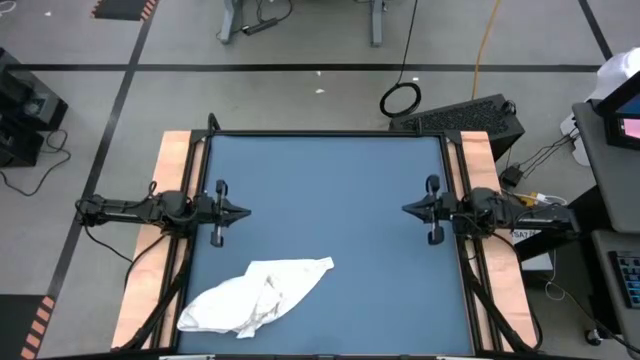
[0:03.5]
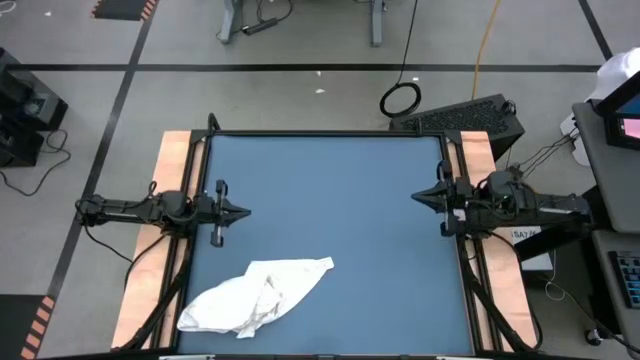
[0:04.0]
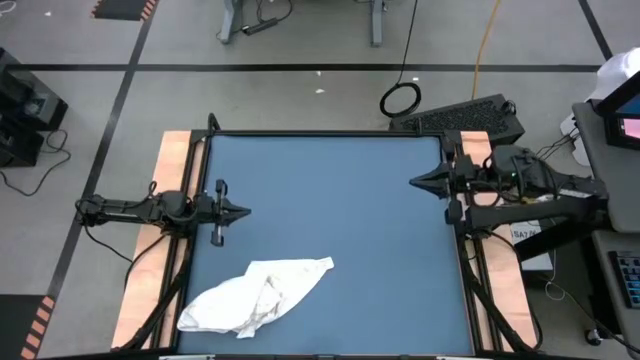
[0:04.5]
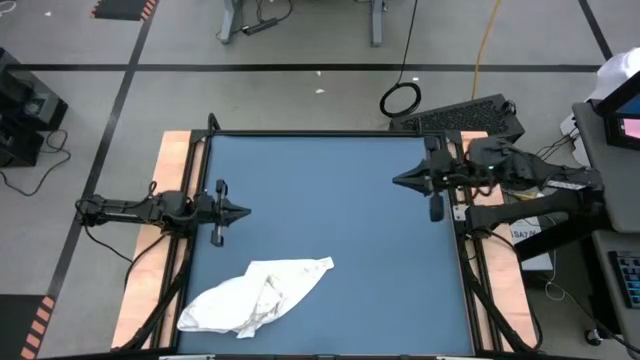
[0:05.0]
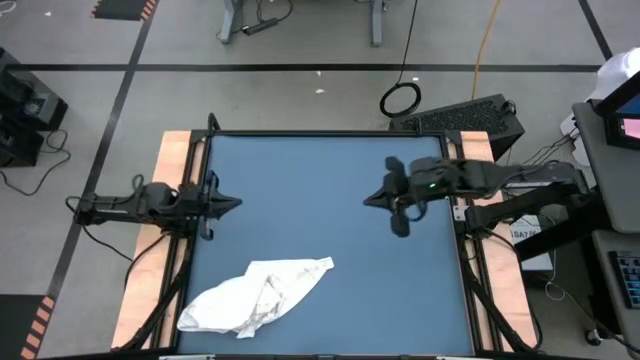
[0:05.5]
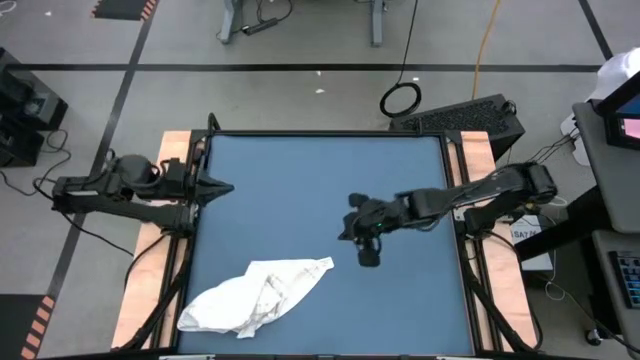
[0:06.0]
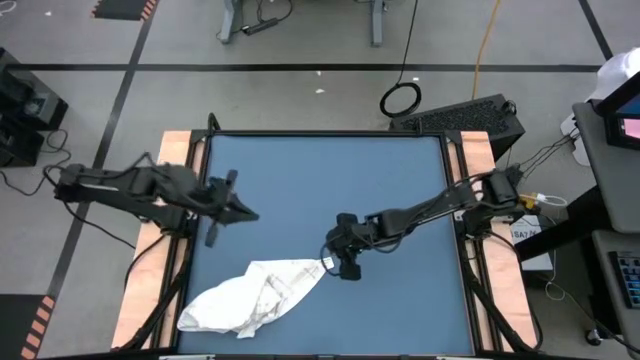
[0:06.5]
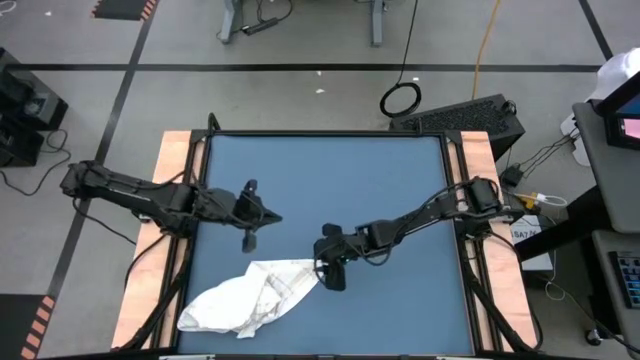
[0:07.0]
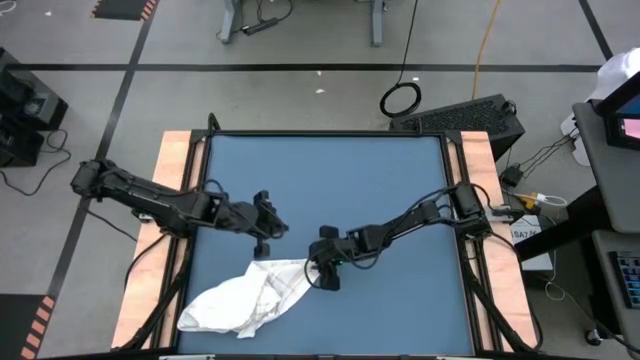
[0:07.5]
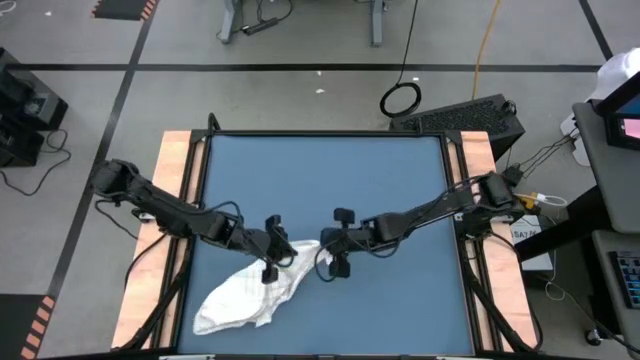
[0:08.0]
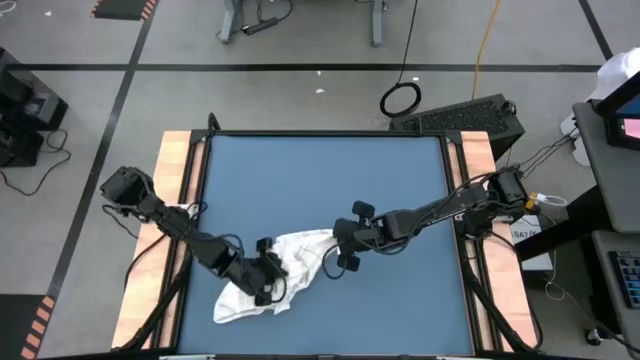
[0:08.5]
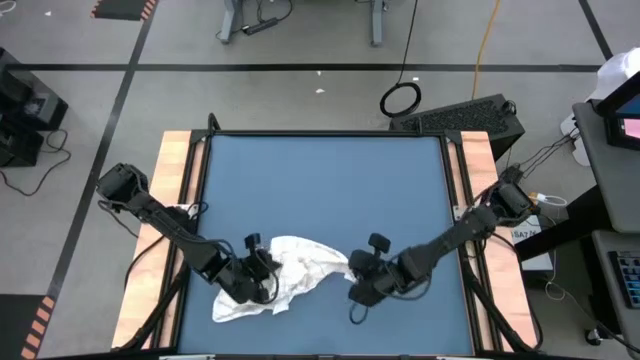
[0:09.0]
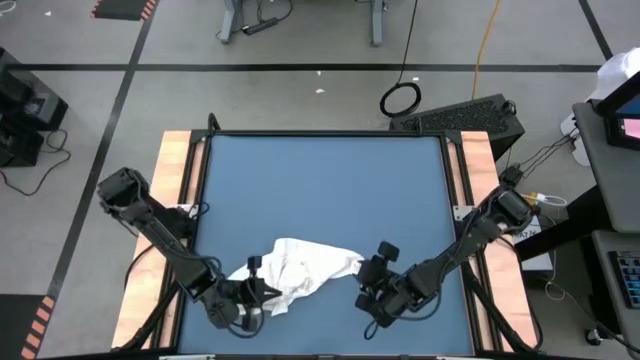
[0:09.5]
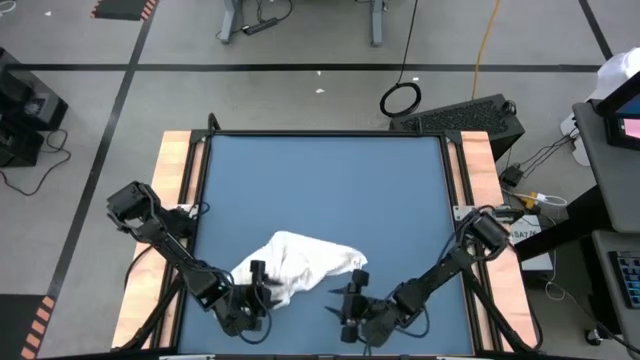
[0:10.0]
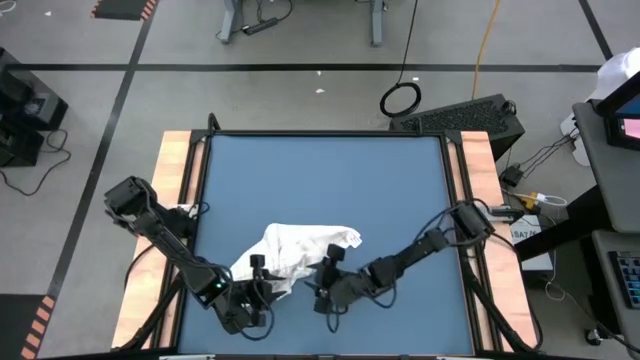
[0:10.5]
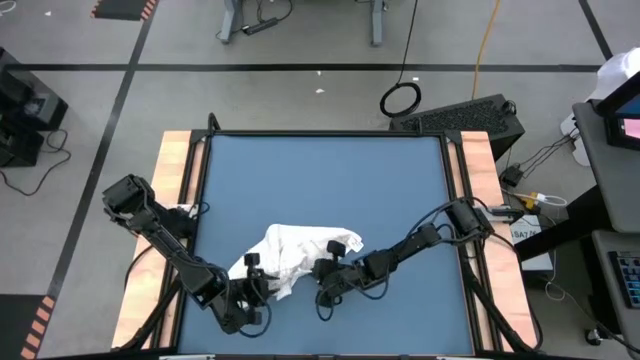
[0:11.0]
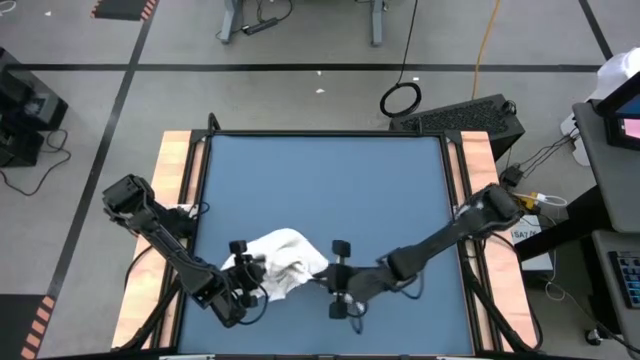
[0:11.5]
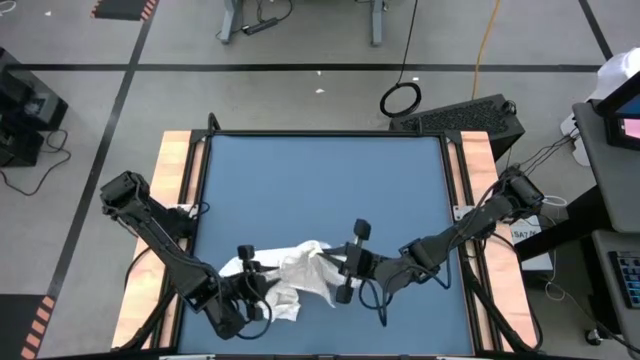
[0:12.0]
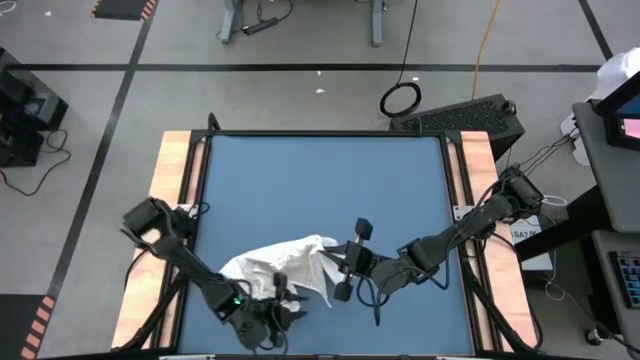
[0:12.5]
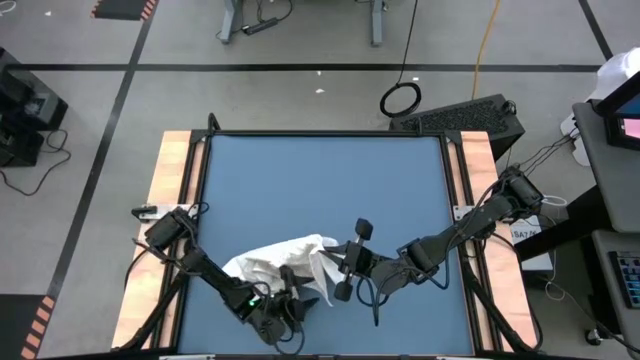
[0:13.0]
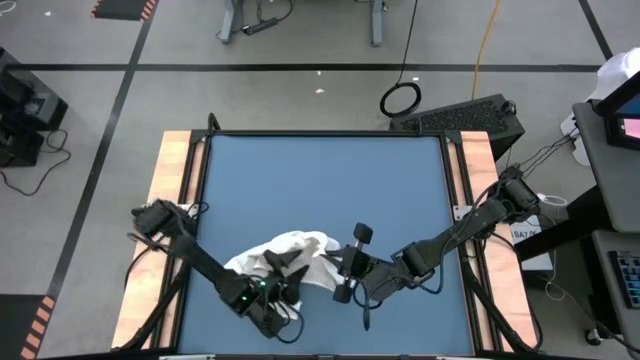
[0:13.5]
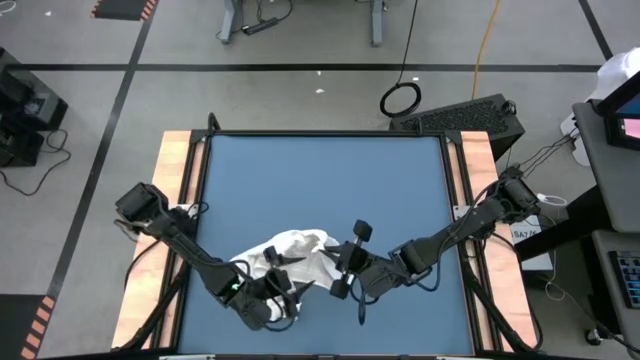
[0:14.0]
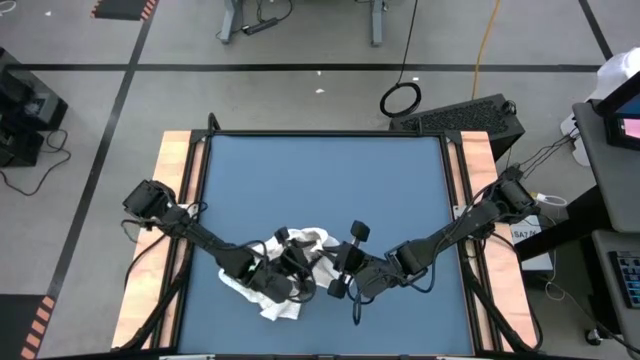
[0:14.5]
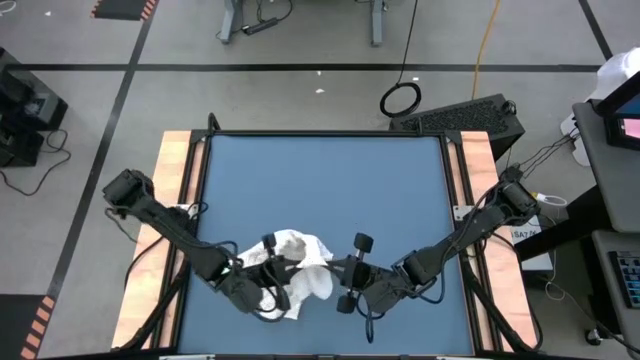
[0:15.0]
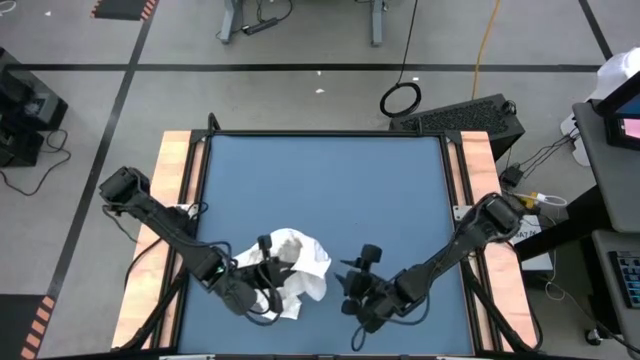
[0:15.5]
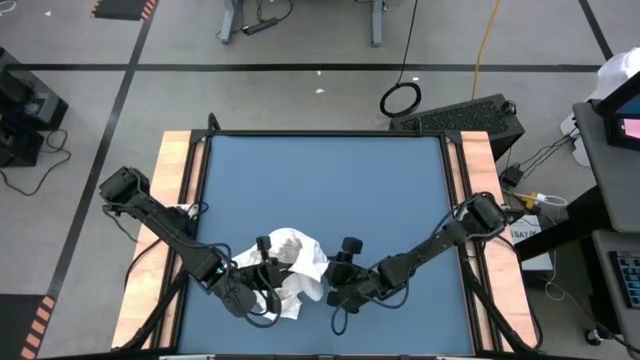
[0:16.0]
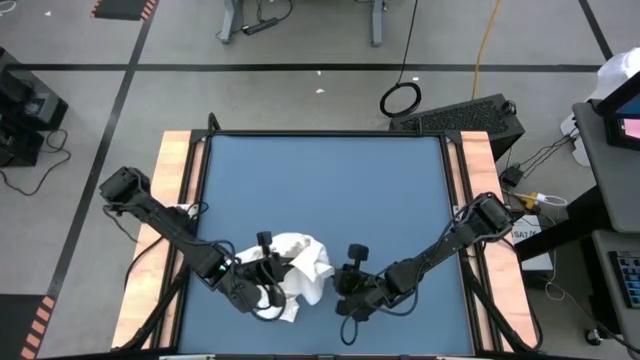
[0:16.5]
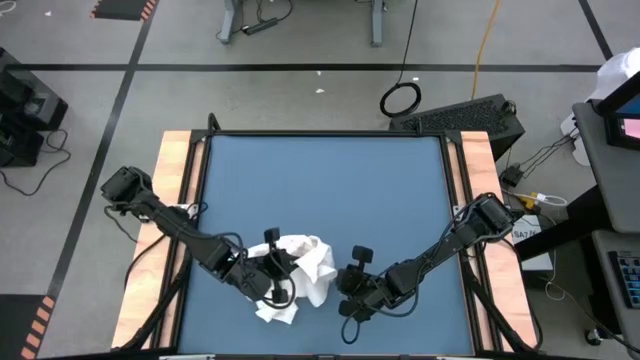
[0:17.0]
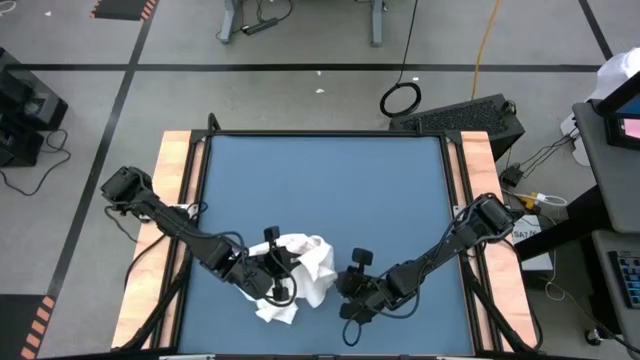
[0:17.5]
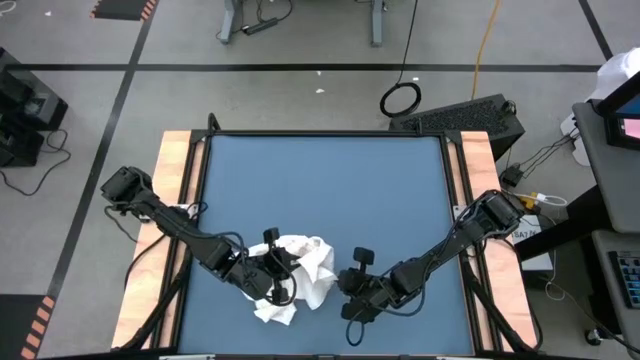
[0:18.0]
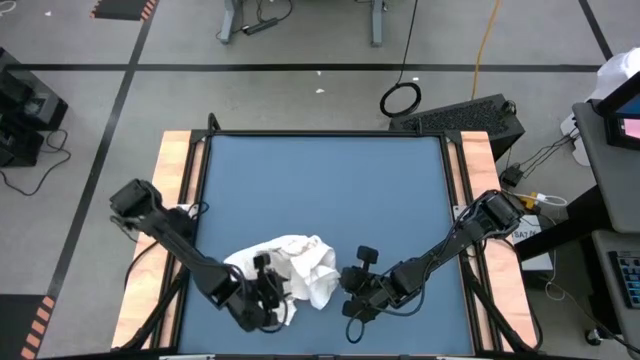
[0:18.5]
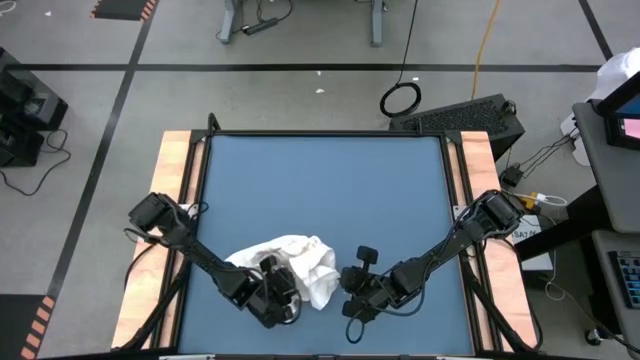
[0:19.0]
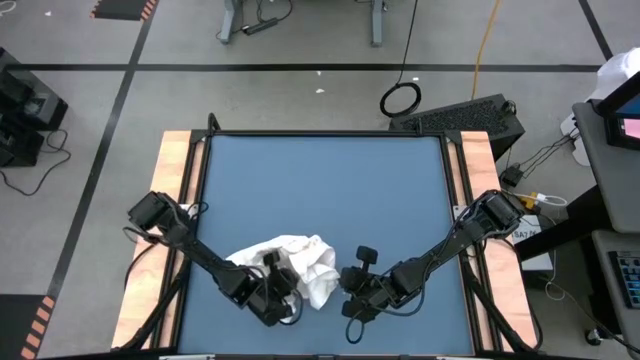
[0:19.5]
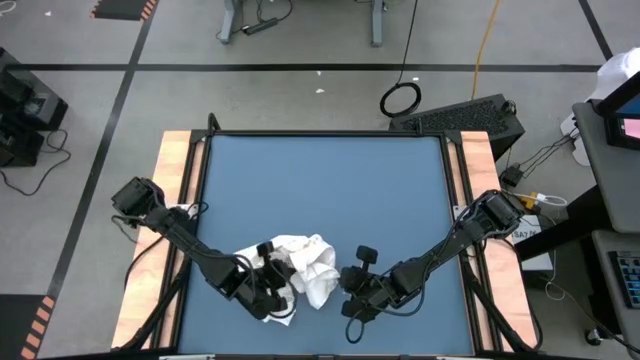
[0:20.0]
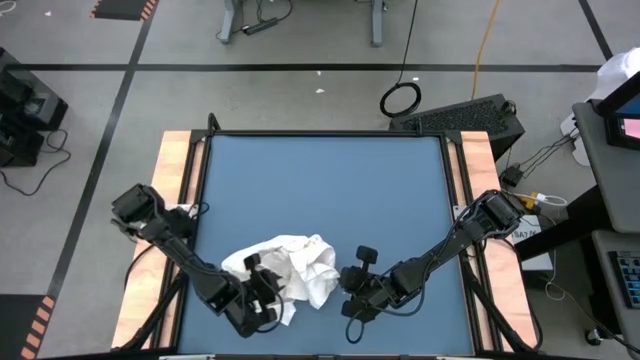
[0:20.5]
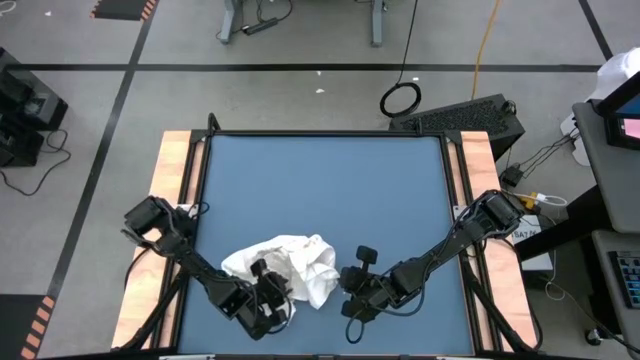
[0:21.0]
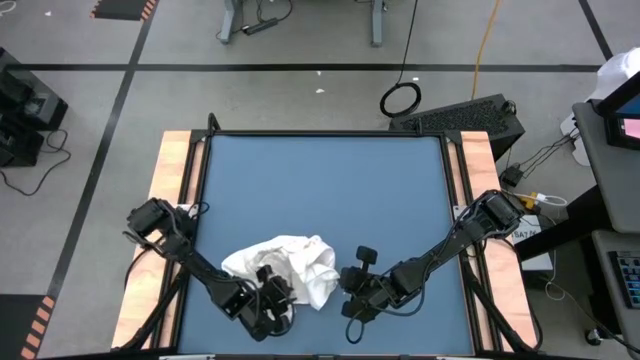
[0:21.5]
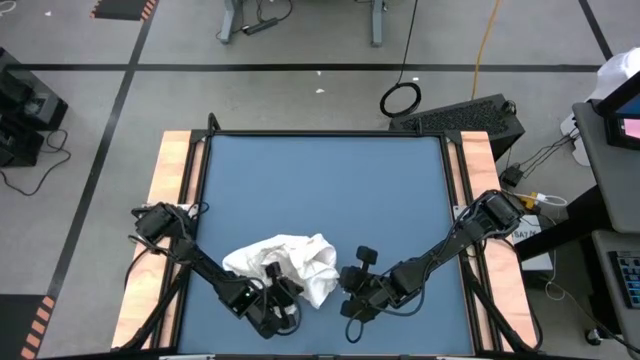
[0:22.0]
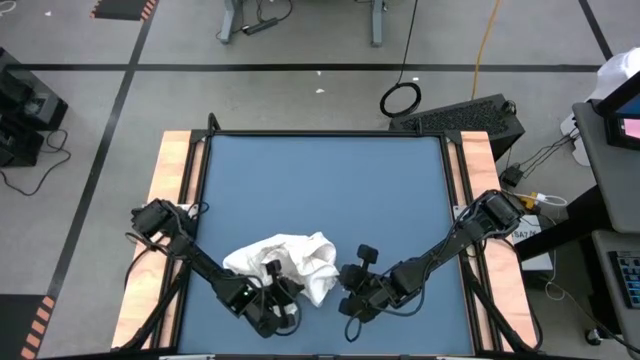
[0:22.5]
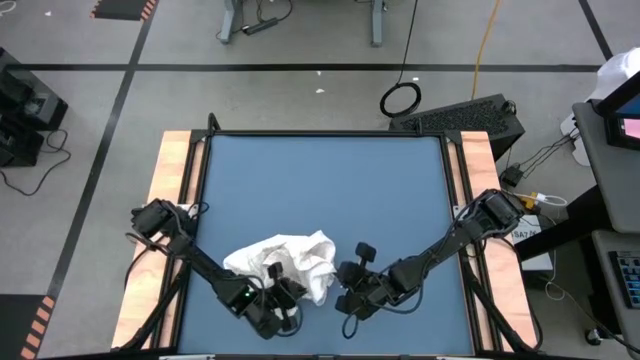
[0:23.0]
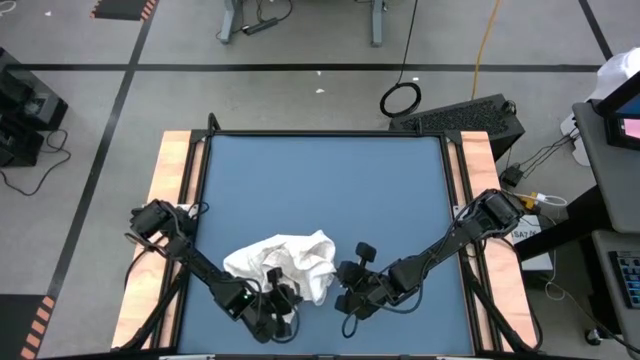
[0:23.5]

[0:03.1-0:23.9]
Task: Roll towel into tight, uniform cylinder
Roll the white towel
